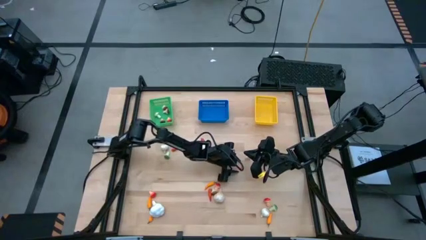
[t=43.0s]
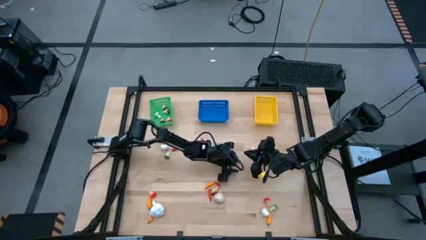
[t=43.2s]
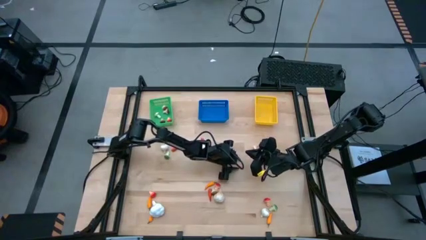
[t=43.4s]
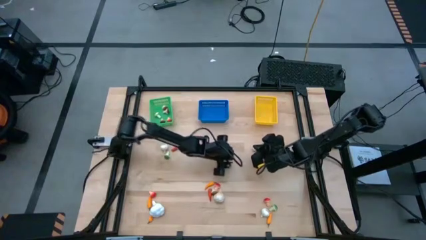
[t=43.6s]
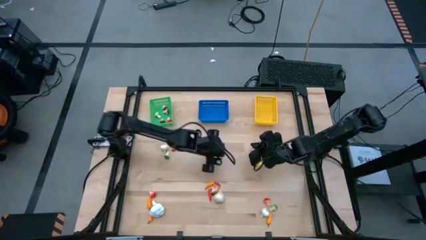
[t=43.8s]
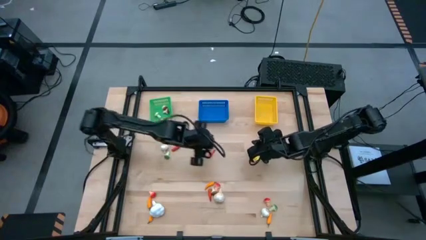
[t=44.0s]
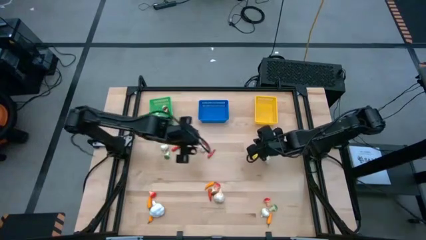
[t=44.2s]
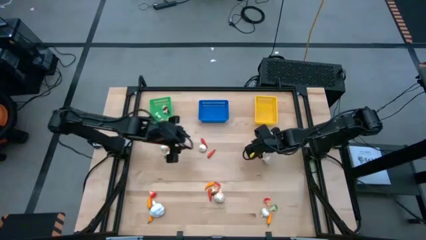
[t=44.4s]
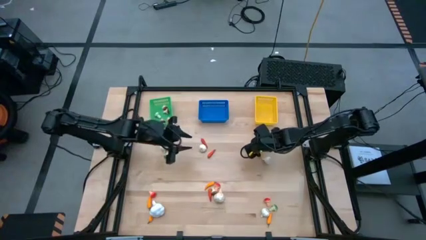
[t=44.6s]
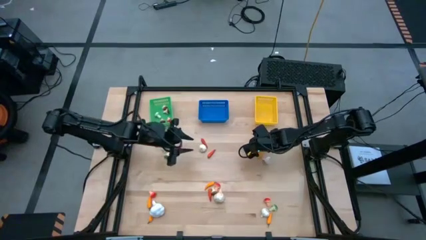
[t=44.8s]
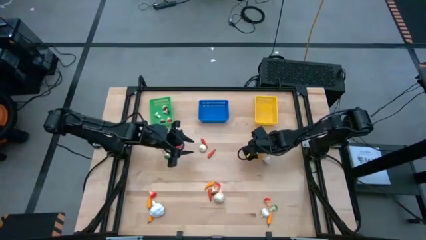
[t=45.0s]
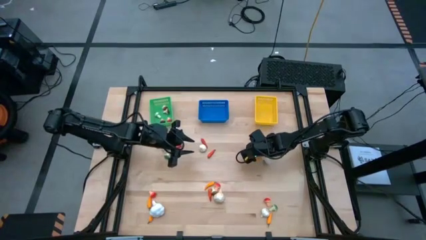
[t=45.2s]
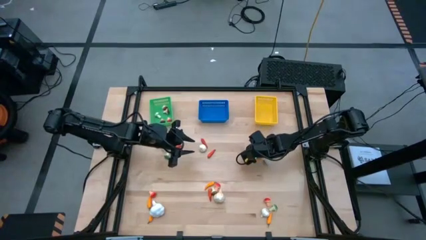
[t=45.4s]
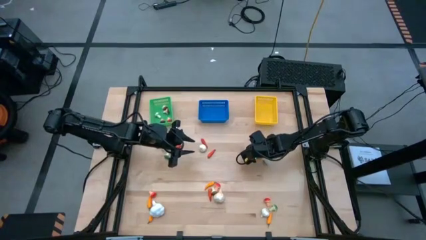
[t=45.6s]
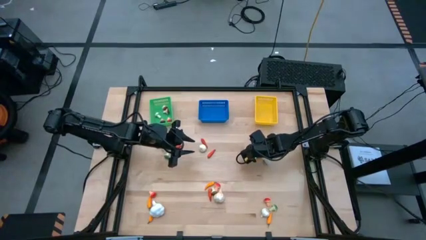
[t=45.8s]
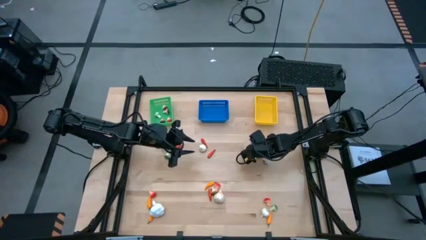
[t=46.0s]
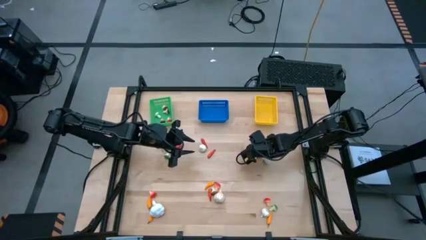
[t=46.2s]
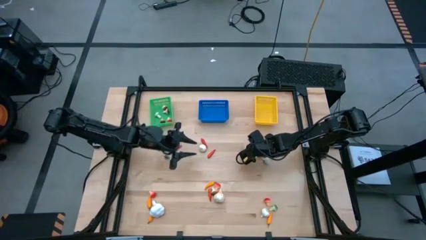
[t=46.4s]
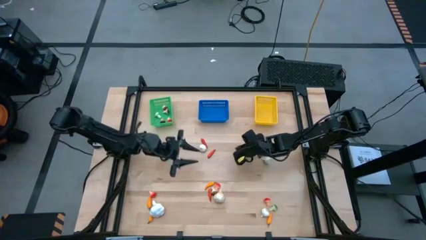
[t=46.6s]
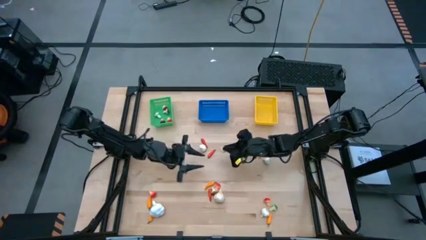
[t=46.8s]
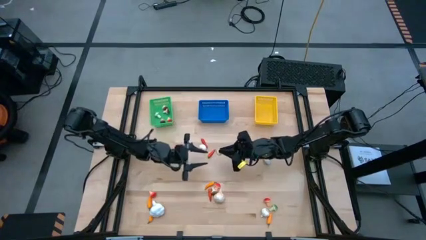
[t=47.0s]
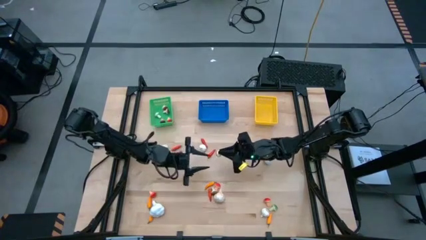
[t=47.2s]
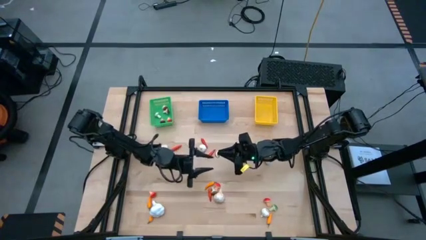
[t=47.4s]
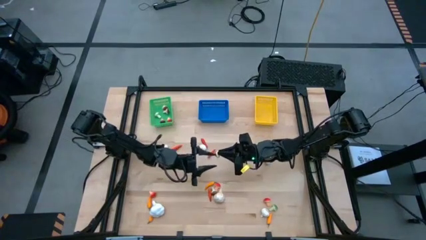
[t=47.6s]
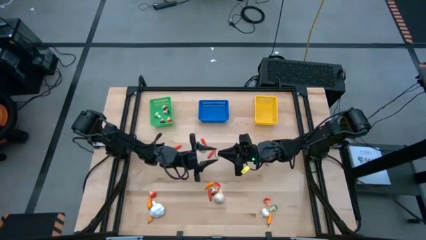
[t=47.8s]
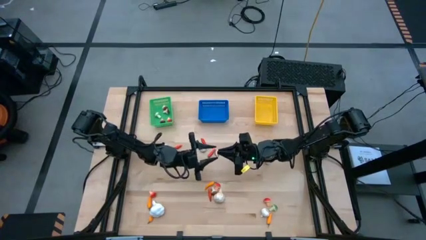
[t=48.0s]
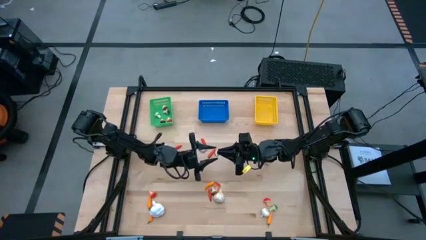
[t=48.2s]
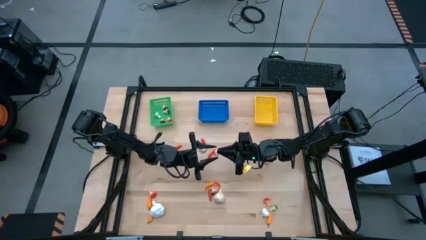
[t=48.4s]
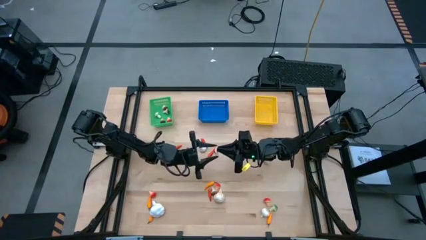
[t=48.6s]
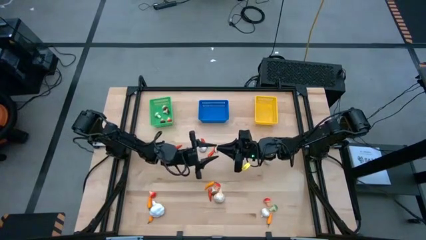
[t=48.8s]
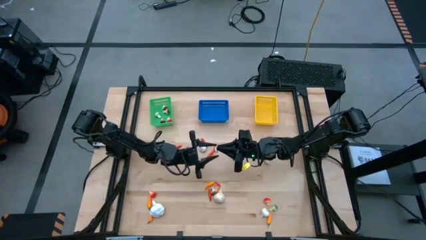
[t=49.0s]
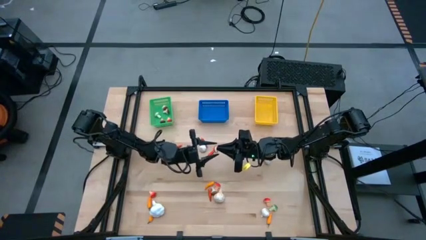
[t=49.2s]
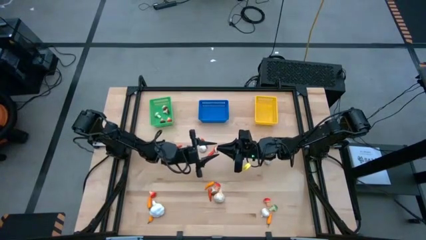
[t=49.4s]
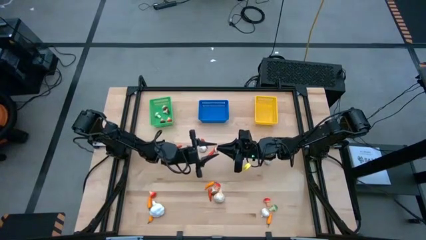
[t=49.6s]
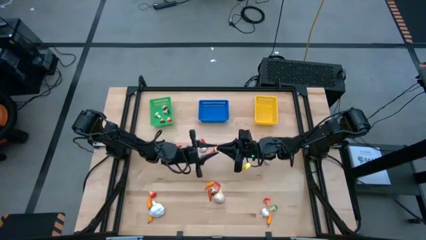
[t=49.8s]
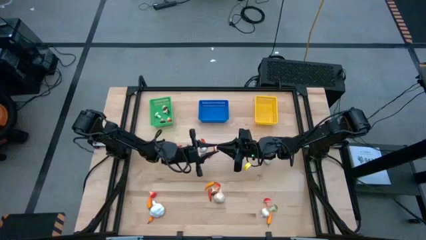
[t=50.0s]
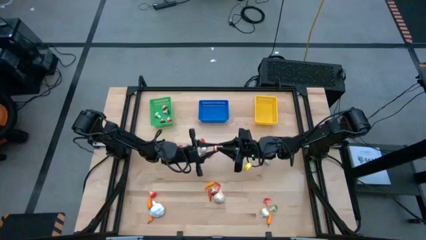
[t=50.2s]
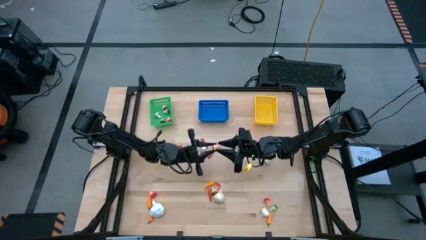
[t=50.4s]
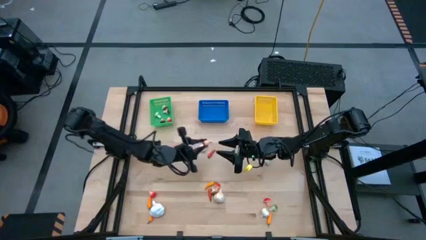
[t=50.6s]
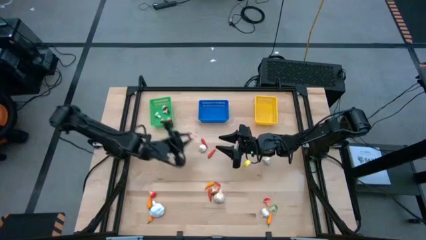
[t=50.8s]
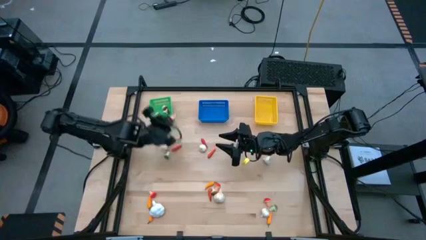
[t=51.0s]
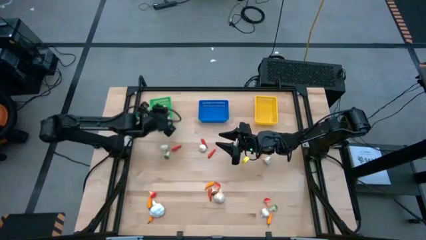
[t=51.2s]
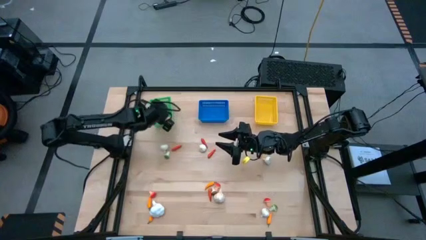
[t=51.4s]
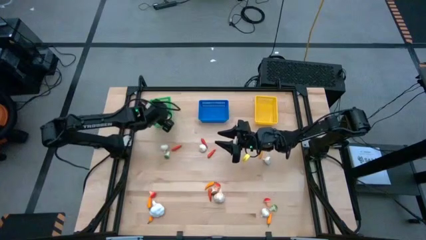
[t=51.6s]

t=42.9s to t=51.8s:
Task: Sort produce into baskets
Put the orange mushroom into the green bin

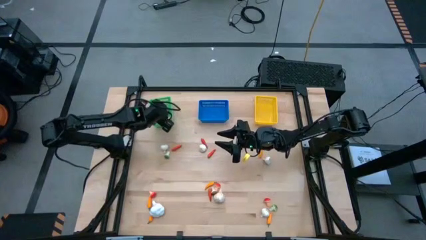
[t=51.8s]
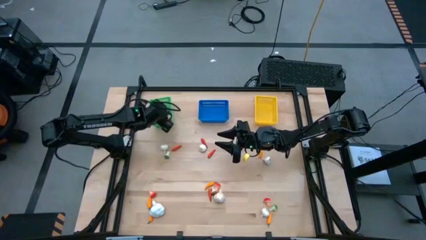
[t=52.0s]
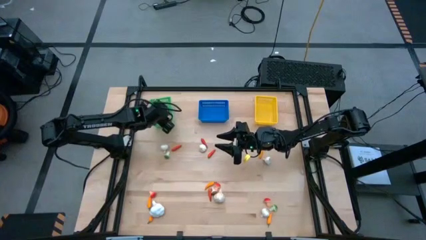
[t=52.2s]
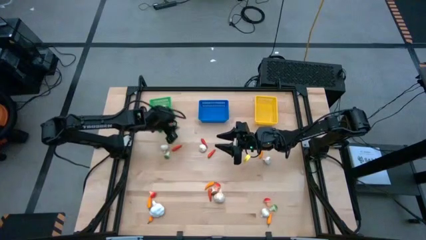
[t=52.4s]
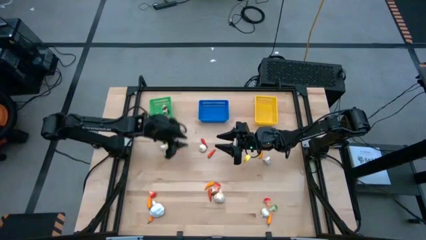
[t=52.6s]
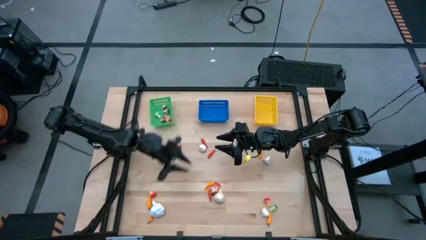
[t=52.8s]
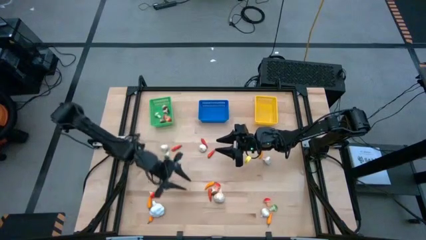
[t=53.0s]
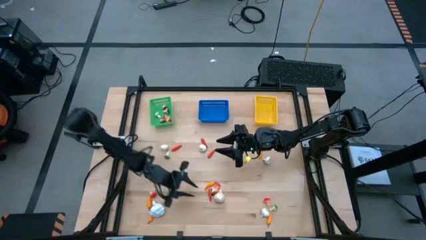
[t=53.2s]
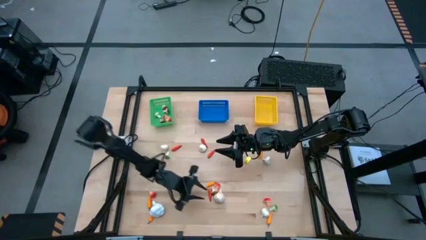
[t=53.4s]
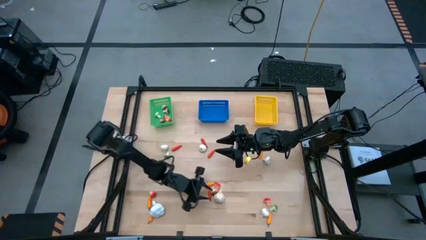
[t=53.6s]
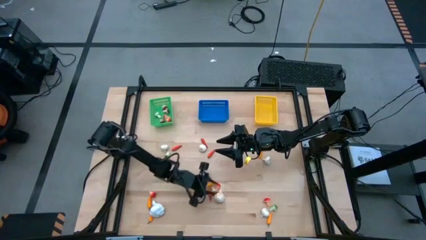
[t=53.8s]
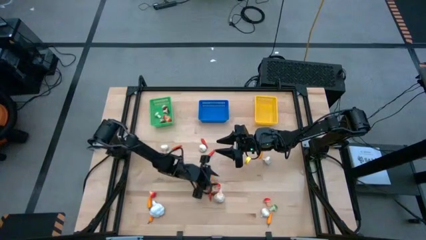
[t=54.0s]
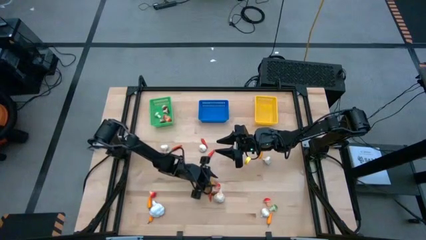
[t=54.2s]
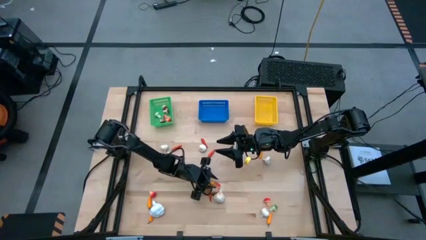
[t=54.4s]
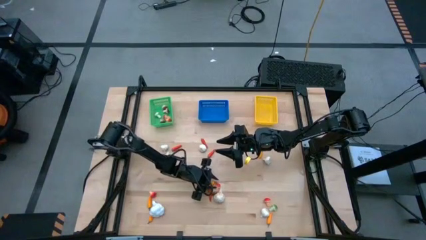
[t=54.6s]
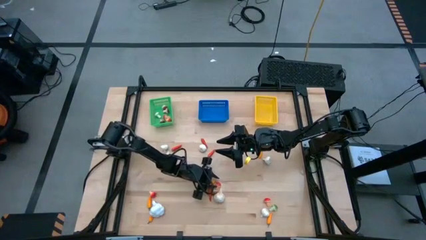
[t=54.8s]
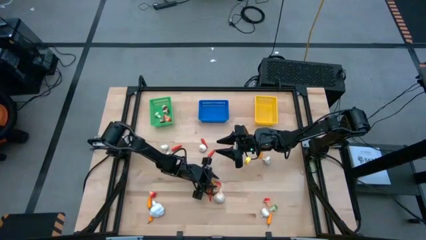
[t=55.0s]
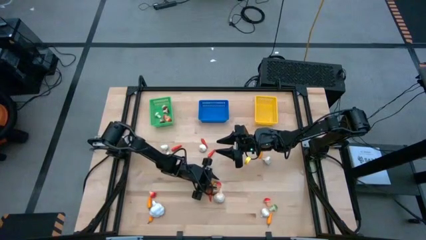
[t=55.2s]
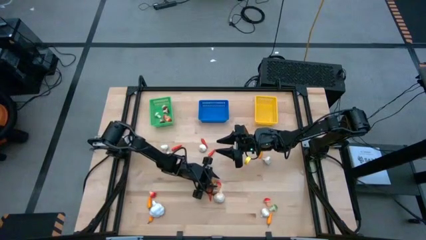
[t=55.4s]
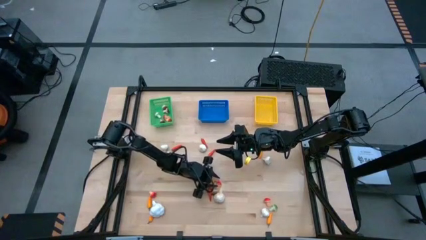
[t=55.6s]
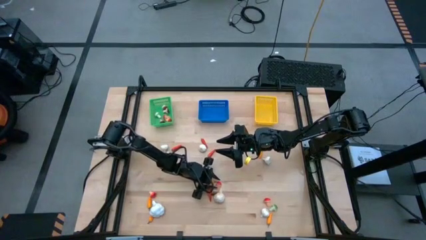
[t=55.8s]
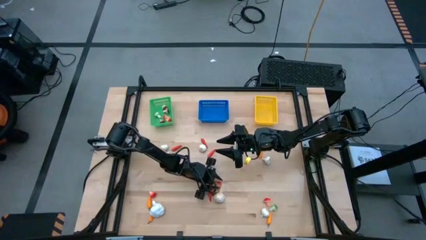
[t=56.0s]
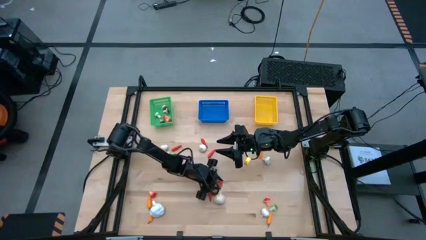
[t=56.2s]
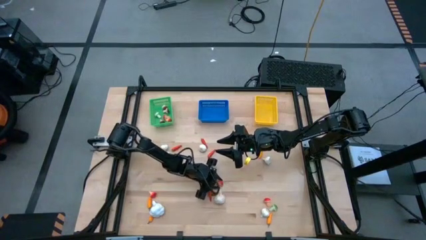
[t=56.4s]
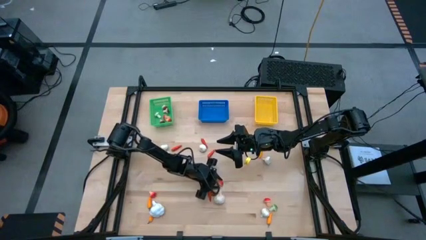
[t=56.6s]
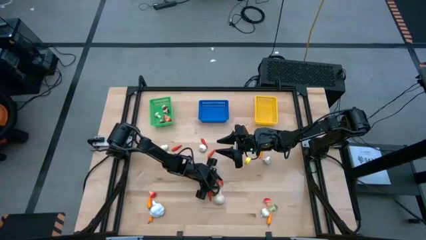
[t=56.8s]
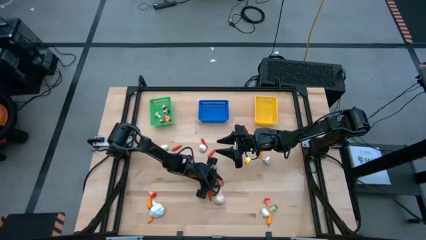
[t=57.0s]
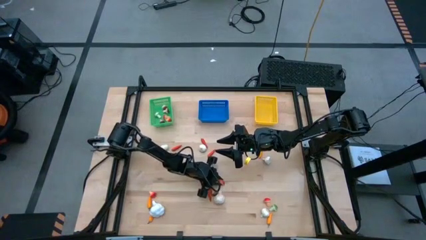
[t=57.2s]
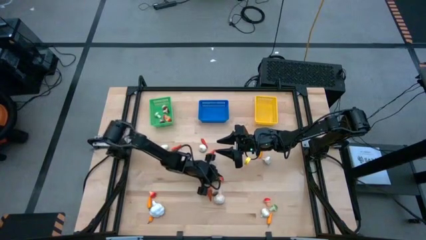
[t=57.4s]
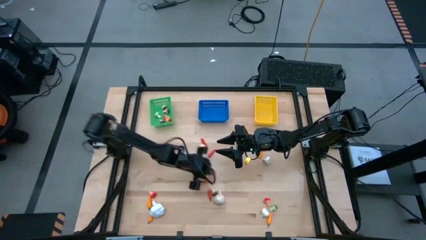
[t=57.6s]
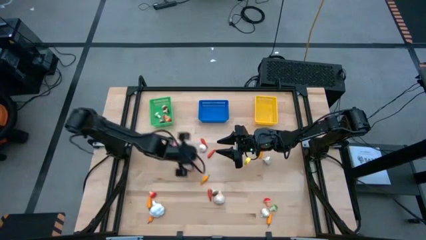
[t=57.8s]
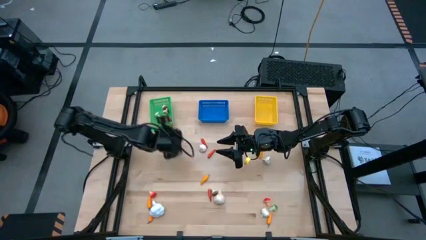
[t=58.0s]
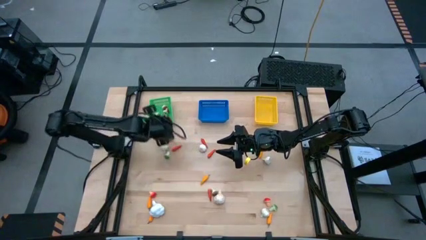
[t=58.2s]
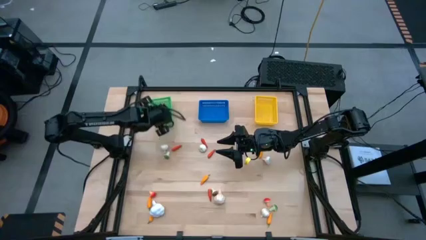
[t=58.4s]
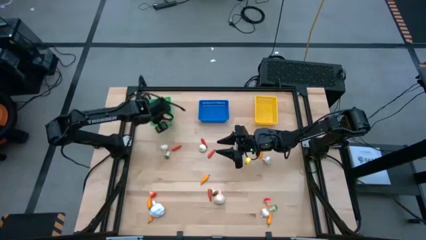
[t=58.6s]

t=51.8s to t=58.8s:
Put the orange mushroom into the green bin
